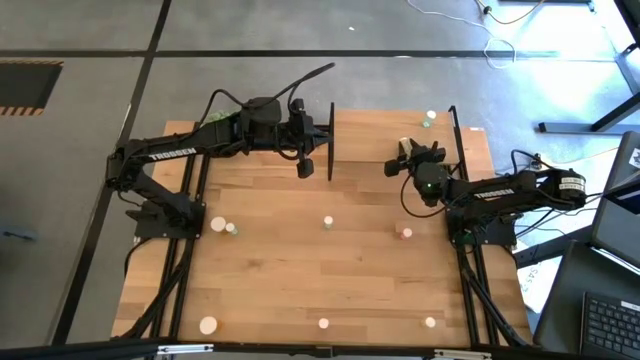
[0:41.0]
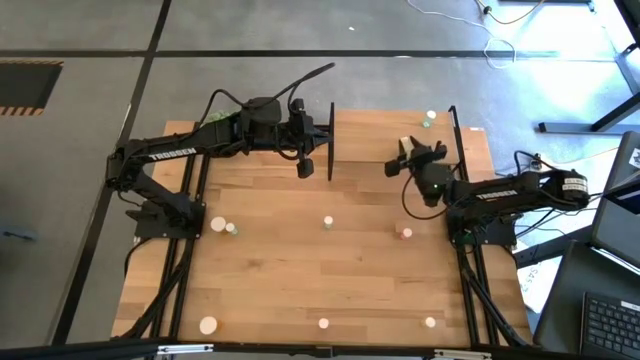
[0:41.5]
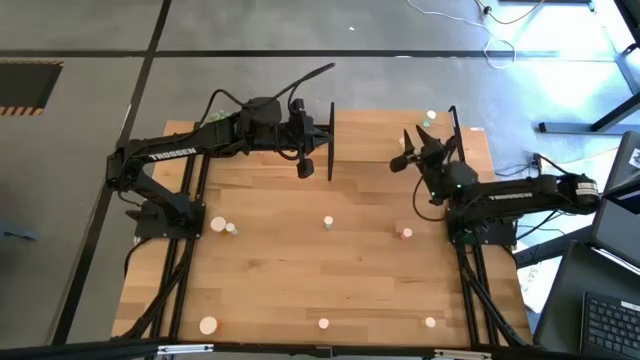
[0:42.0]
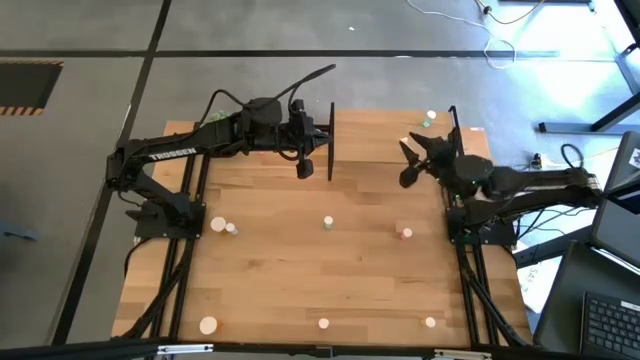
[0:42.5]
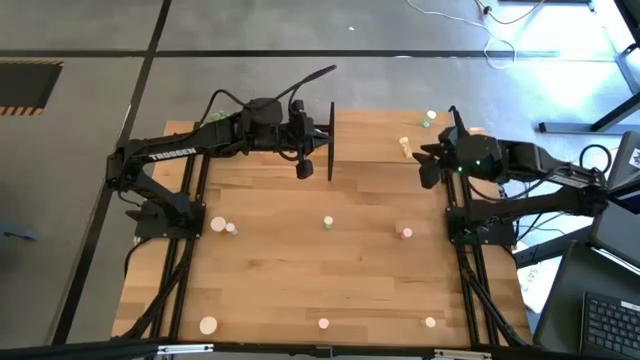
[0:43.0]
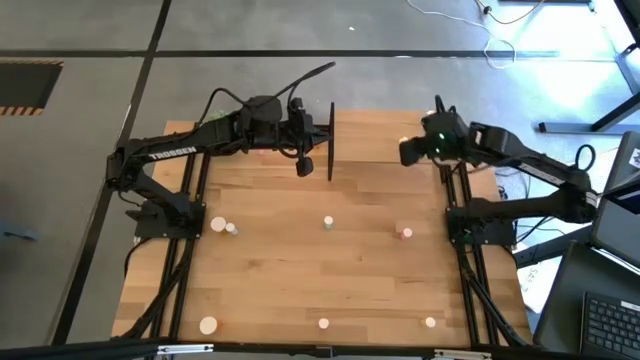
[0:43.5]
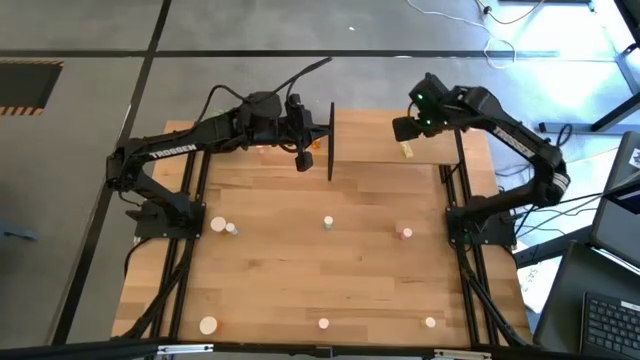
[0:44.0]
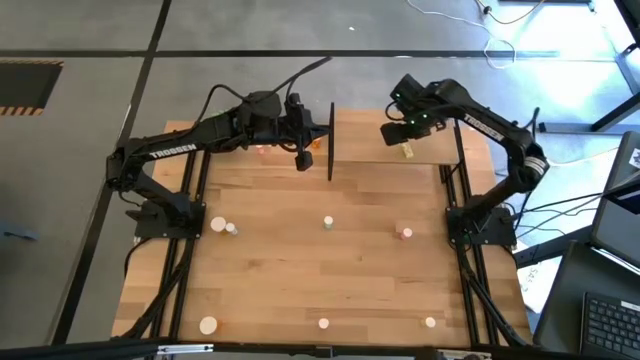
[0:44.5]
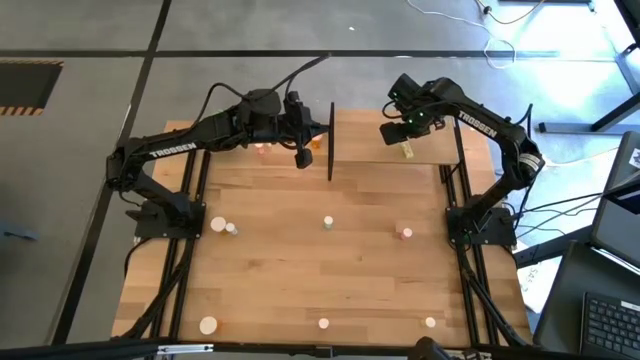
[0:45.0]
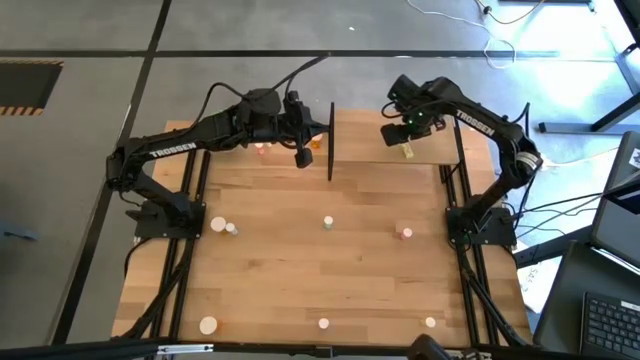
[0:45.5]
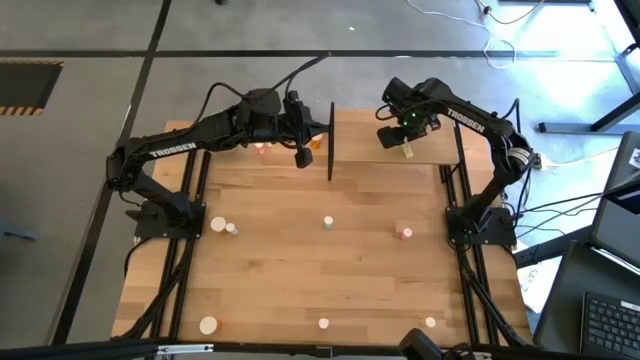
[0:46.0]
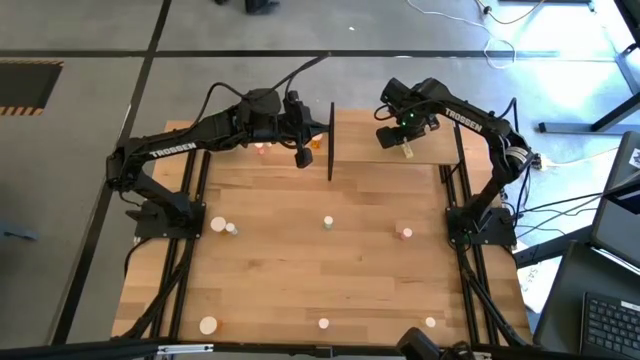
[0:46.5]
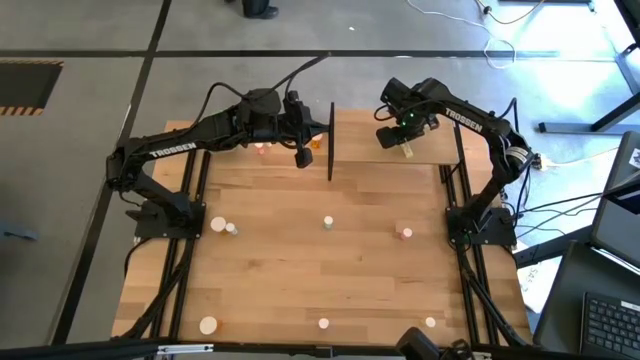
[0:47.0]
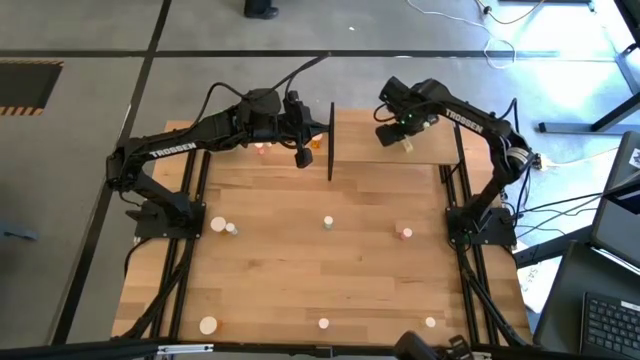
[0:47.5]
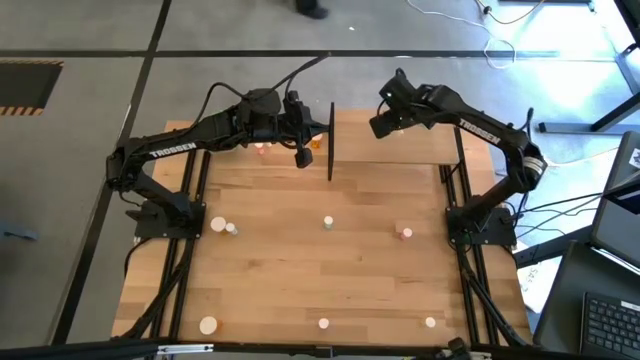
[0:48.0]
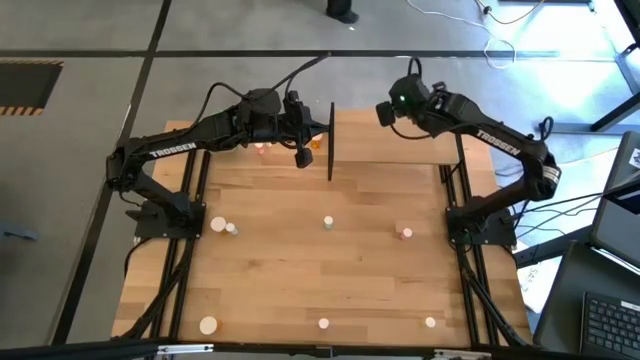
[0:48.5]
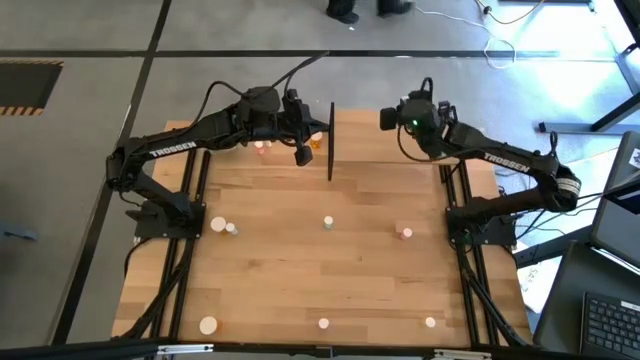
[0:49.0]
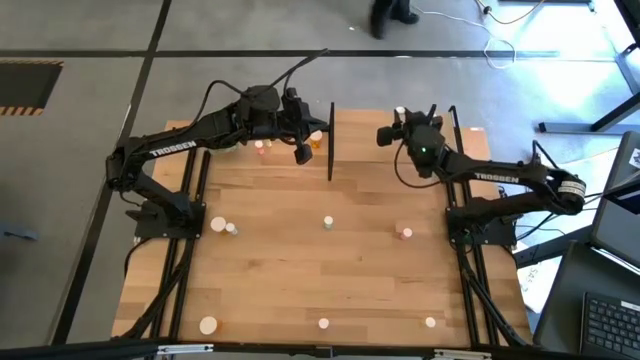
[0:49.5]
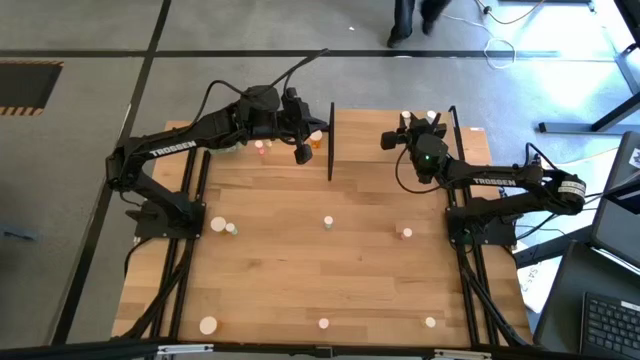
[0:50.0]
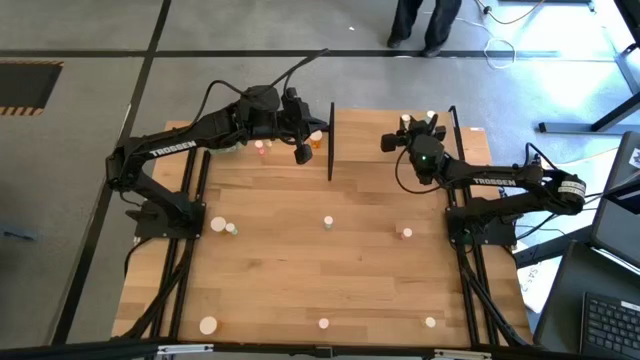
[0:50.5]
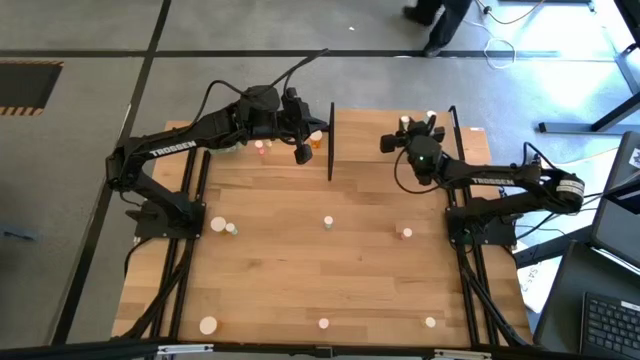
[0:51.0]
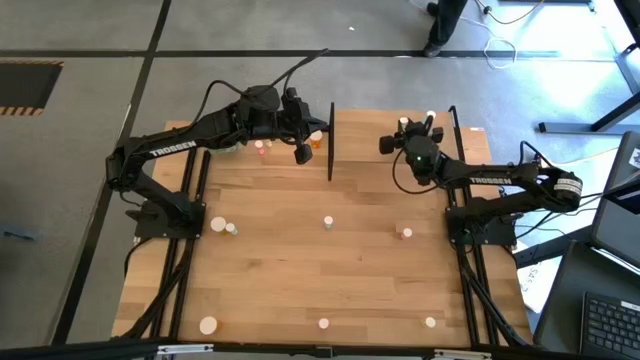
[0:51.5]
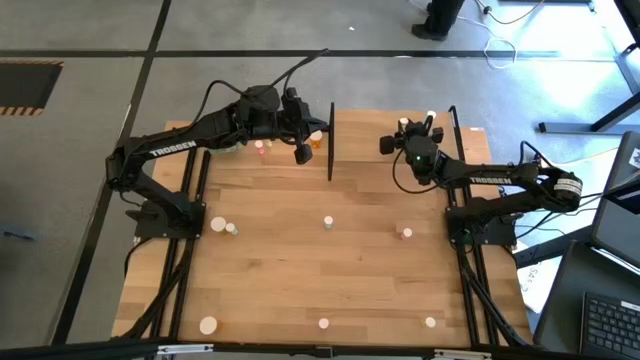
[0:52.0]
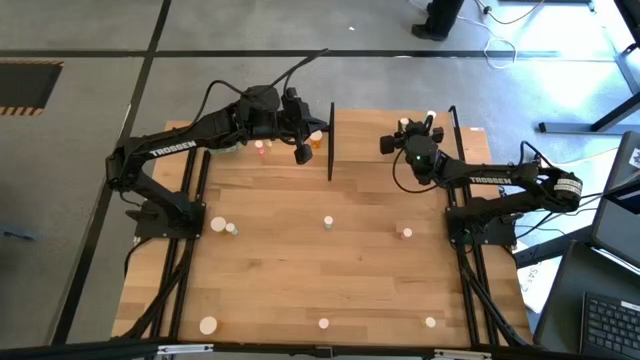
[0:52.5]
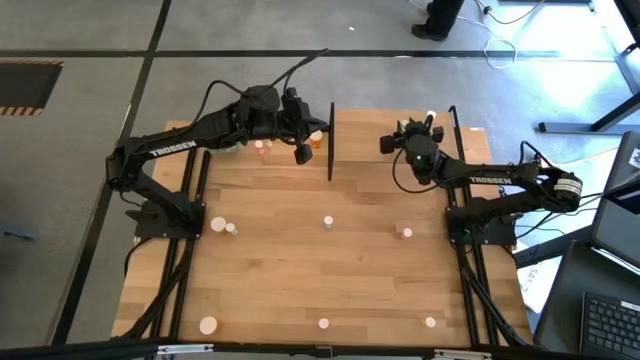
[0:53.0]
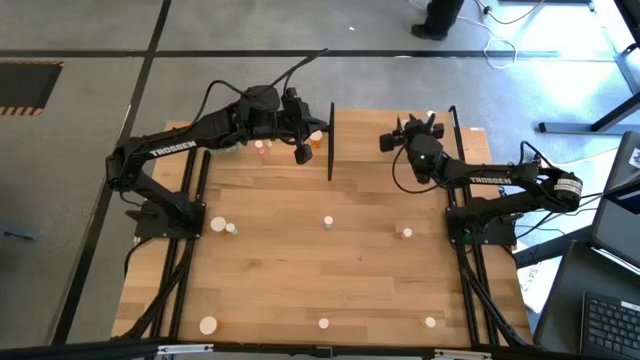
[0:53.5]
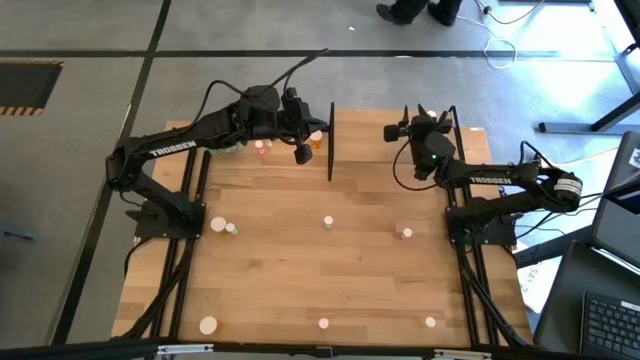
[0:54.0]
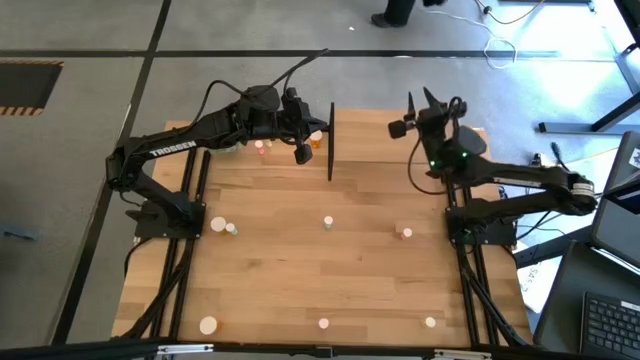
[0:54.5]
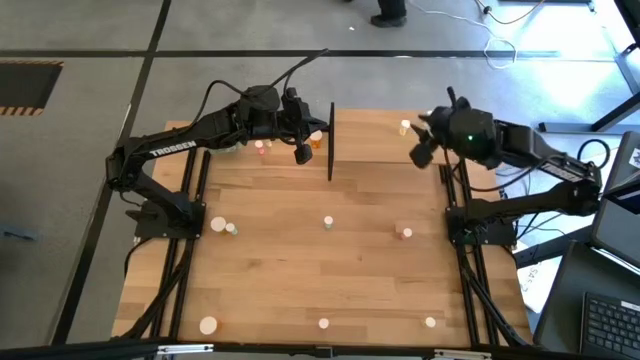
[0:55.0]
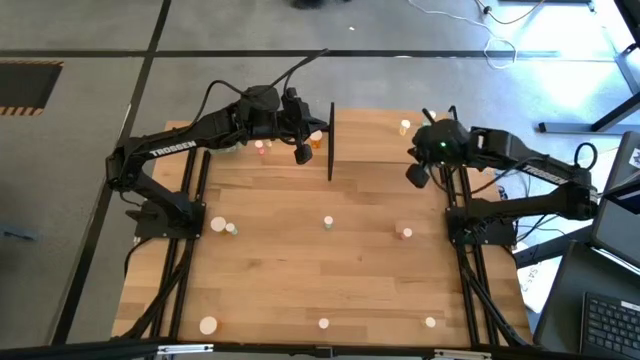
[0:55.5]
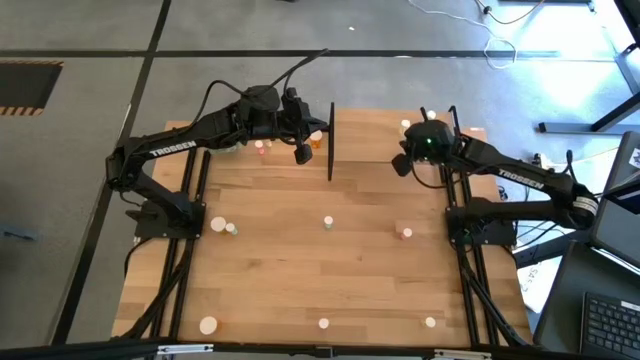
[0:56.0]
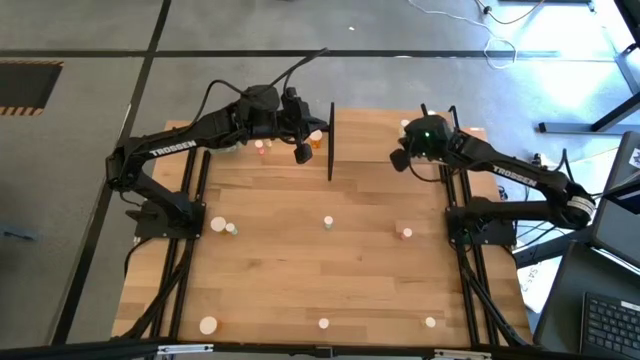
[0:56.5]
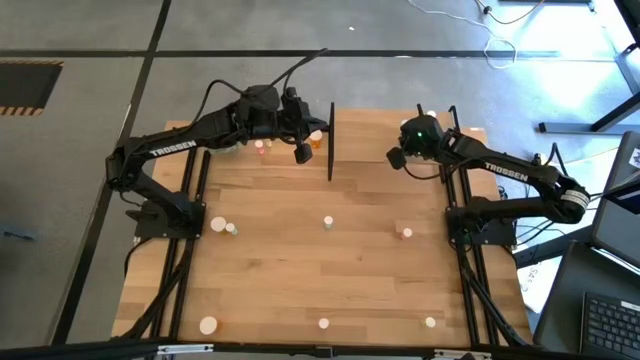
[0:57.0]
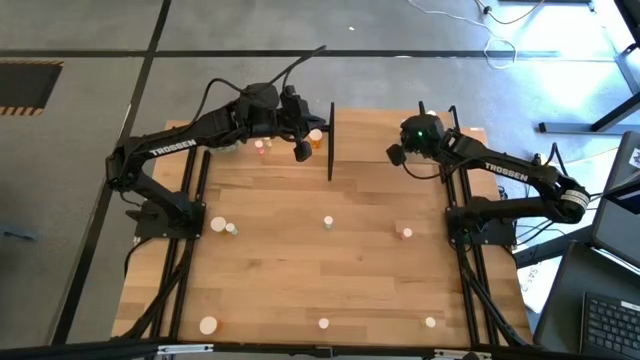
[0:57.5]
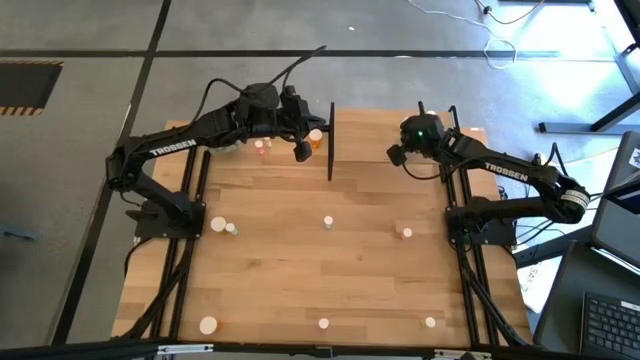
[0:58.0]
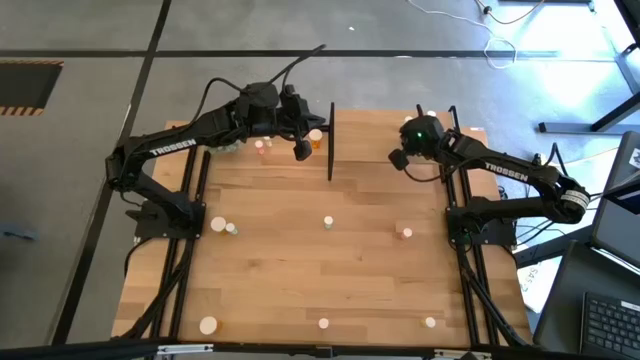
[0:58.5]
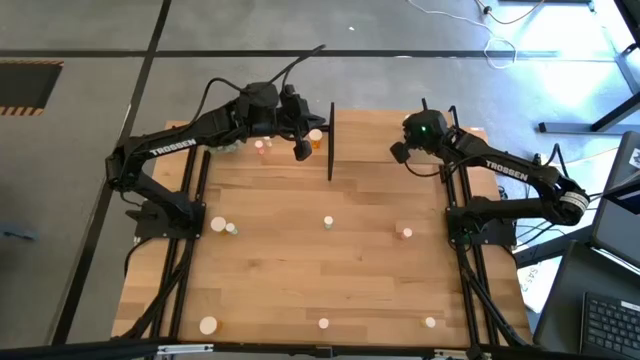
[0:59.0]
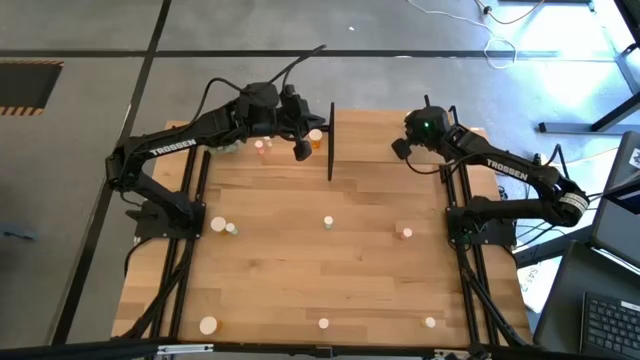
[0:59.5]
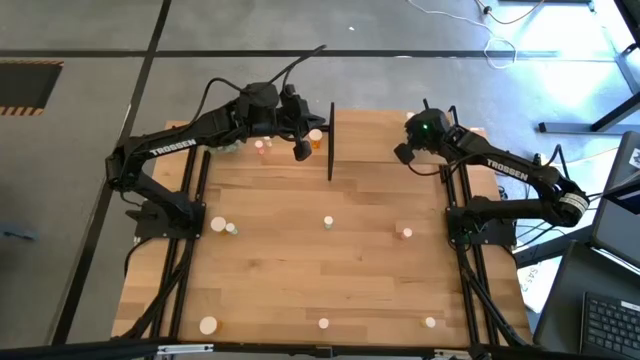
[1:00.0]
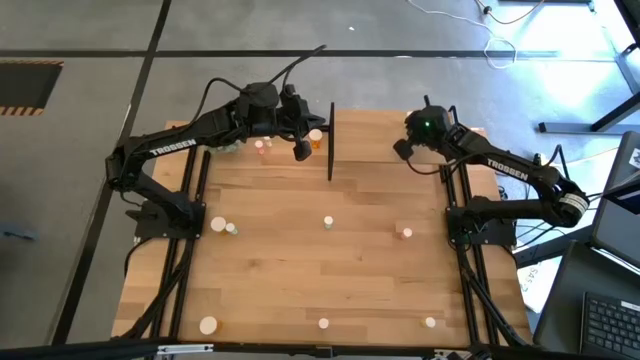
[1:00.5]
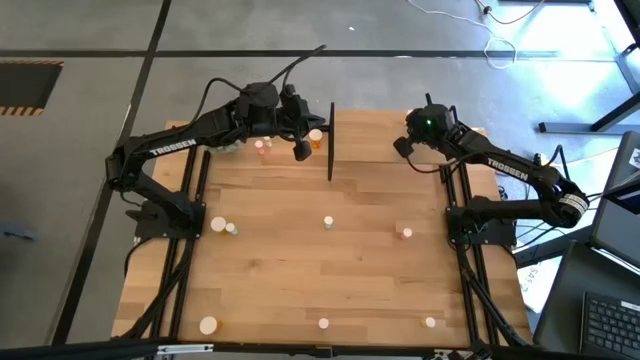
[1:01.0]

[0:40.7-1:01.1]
Task: Pick and place medicine bottles onto shelf by color
Put the middle yellow pill bottle on the shelf
